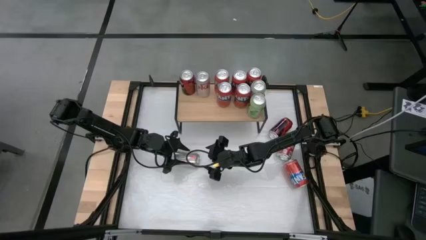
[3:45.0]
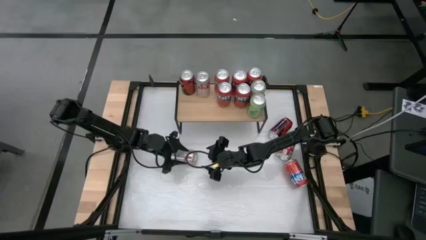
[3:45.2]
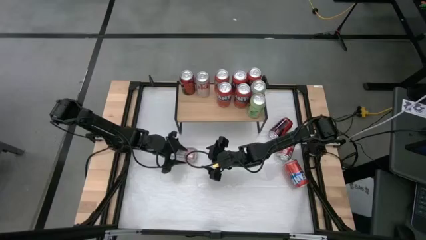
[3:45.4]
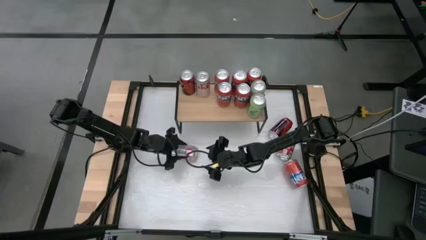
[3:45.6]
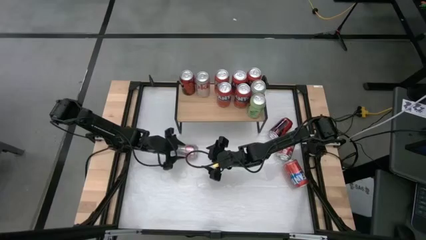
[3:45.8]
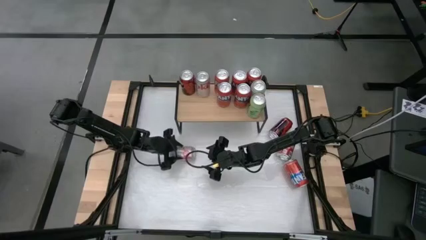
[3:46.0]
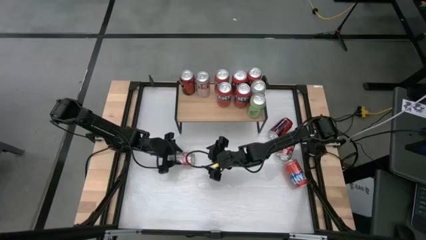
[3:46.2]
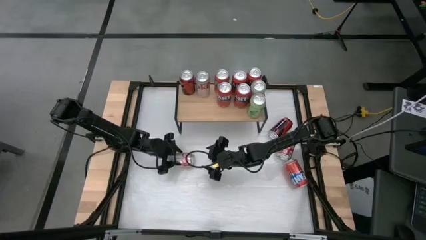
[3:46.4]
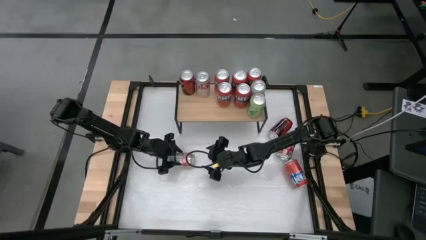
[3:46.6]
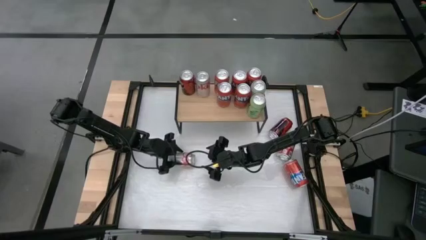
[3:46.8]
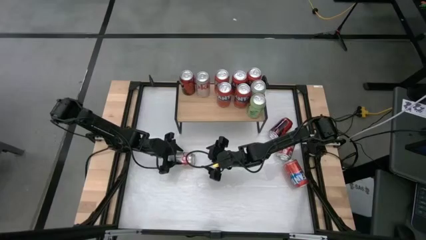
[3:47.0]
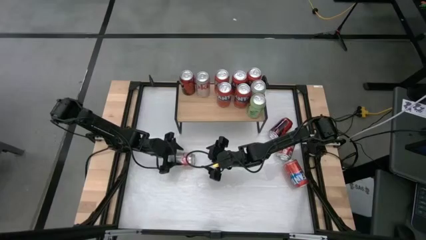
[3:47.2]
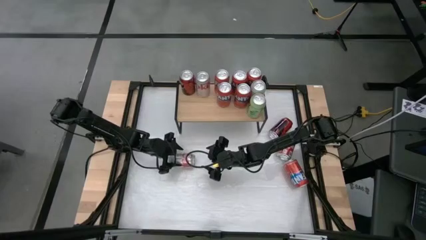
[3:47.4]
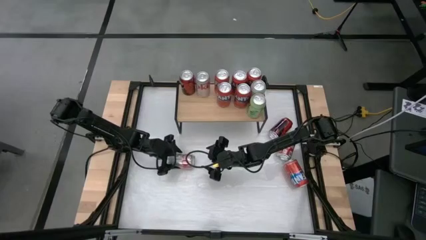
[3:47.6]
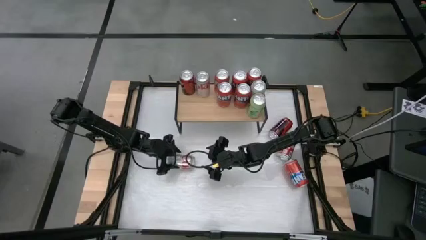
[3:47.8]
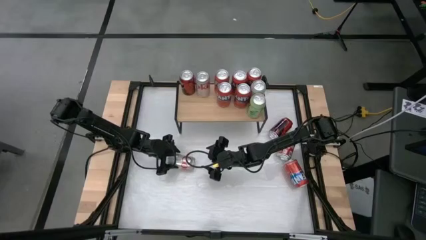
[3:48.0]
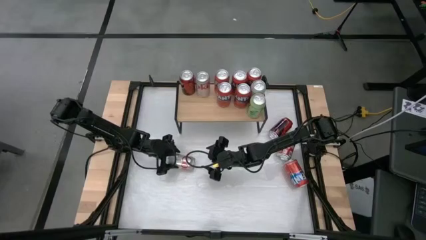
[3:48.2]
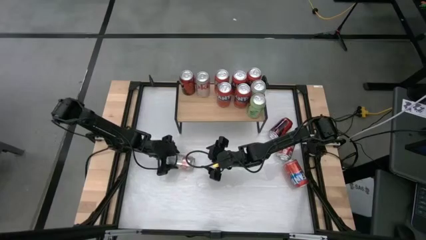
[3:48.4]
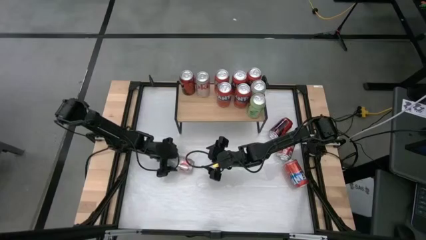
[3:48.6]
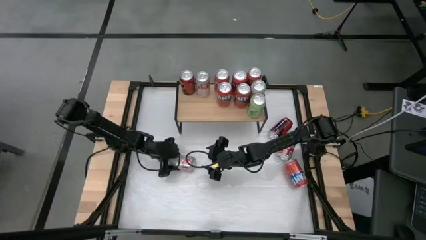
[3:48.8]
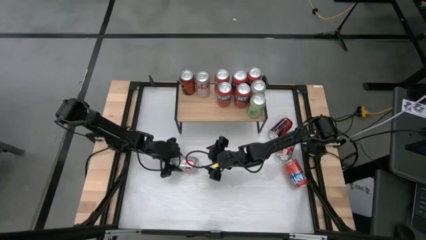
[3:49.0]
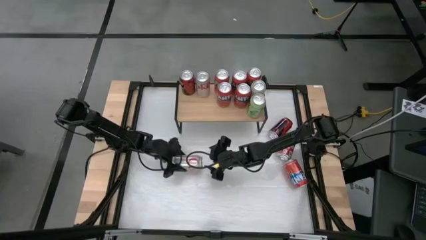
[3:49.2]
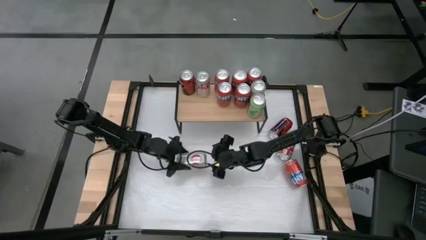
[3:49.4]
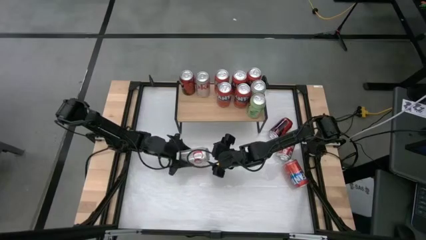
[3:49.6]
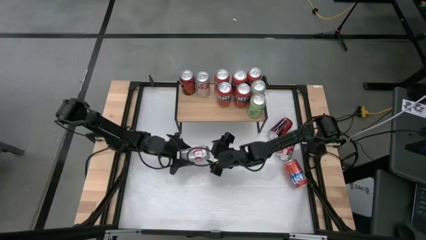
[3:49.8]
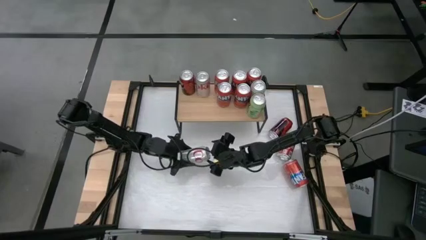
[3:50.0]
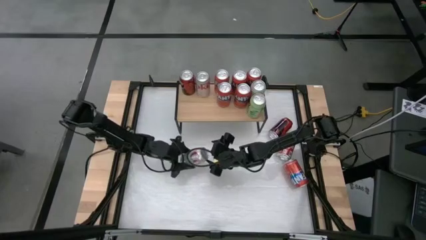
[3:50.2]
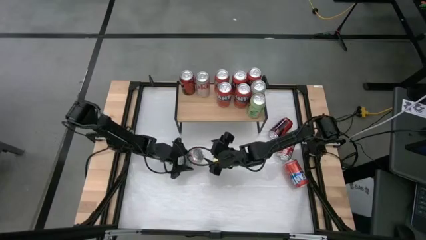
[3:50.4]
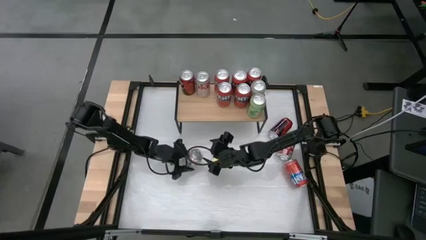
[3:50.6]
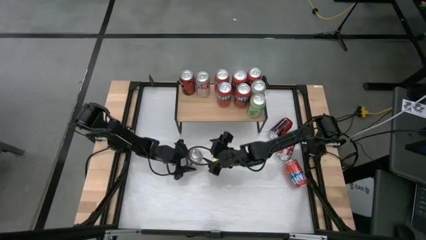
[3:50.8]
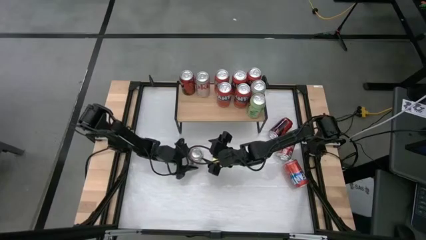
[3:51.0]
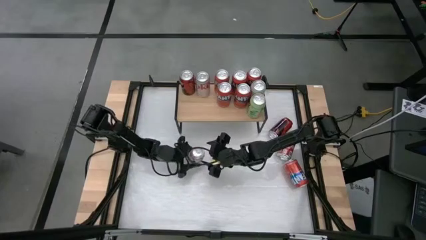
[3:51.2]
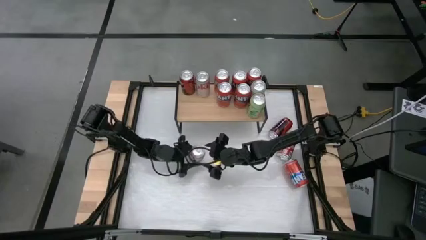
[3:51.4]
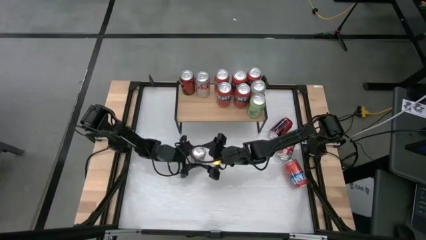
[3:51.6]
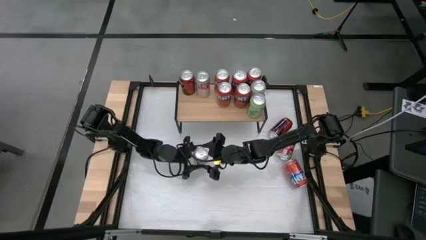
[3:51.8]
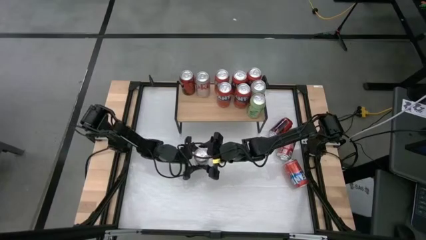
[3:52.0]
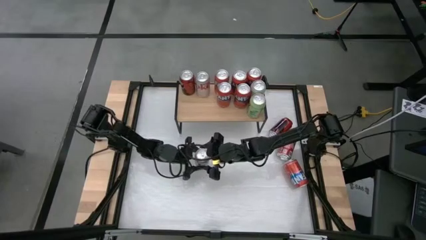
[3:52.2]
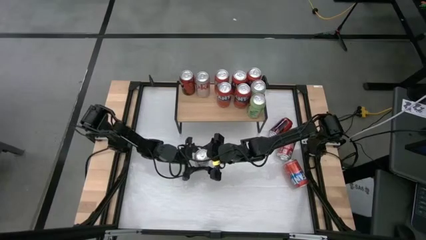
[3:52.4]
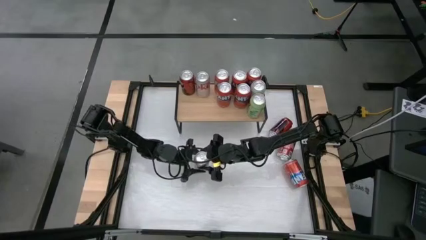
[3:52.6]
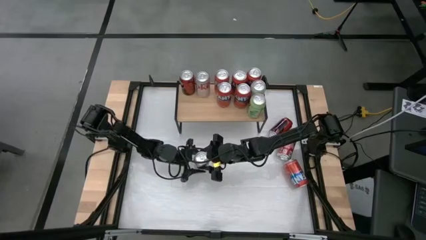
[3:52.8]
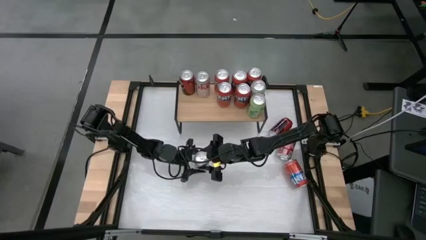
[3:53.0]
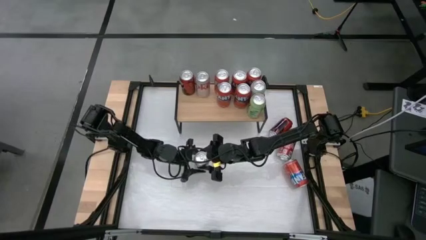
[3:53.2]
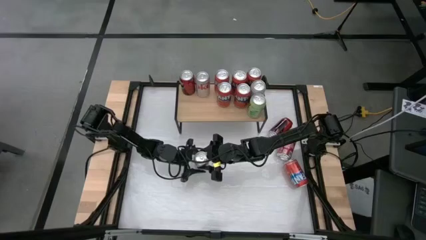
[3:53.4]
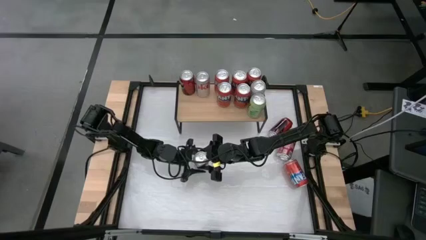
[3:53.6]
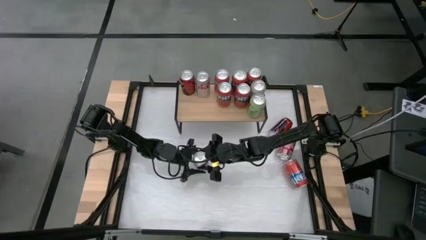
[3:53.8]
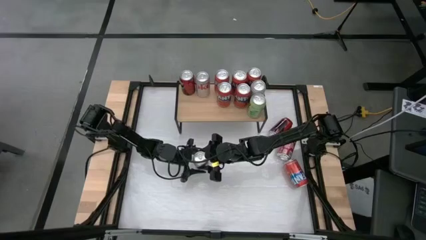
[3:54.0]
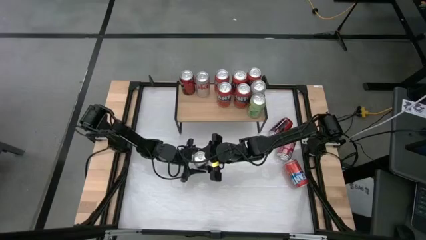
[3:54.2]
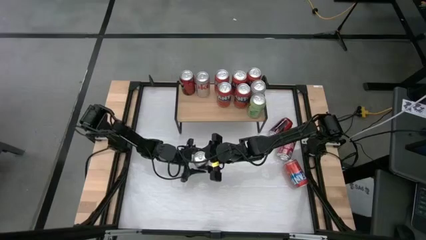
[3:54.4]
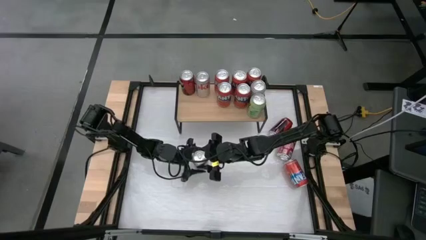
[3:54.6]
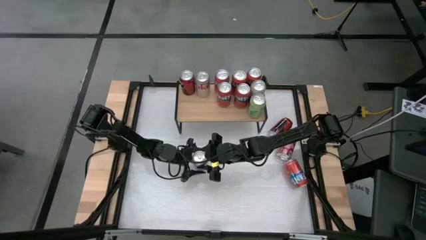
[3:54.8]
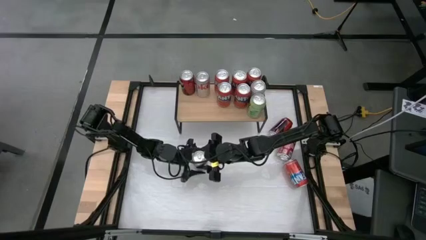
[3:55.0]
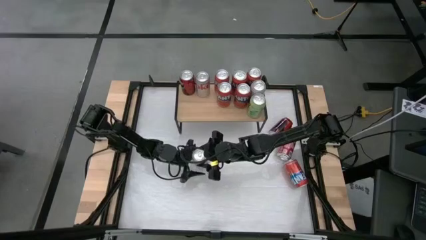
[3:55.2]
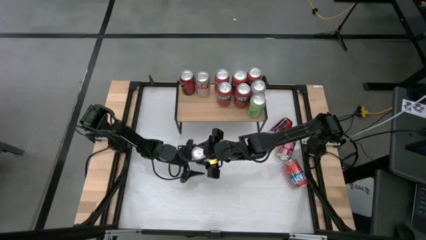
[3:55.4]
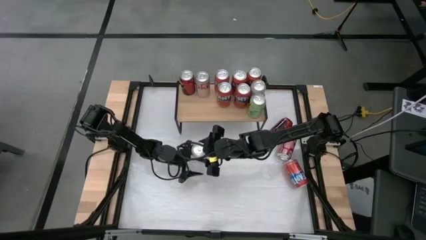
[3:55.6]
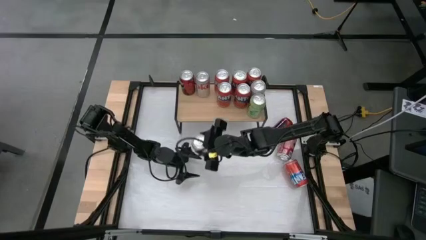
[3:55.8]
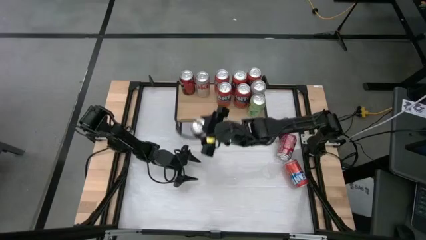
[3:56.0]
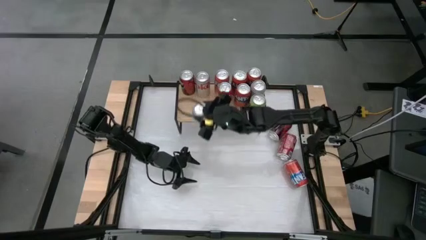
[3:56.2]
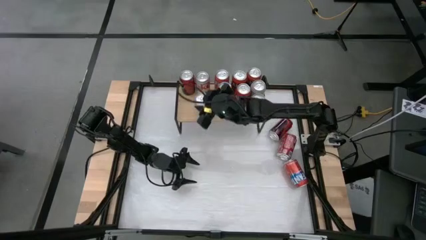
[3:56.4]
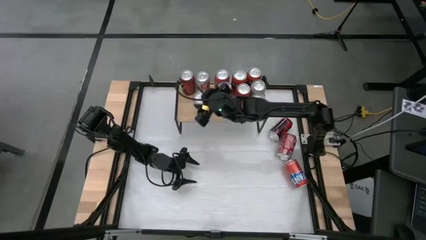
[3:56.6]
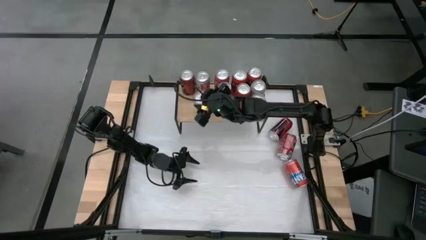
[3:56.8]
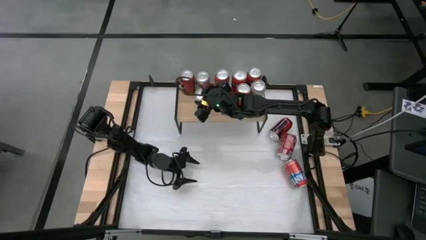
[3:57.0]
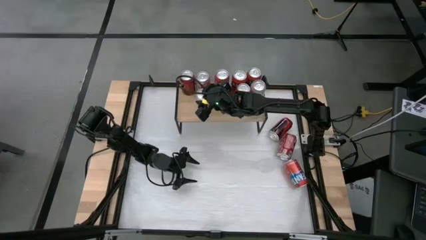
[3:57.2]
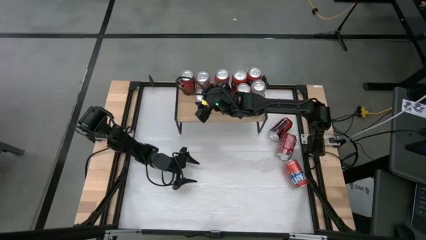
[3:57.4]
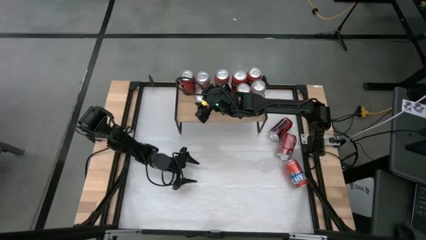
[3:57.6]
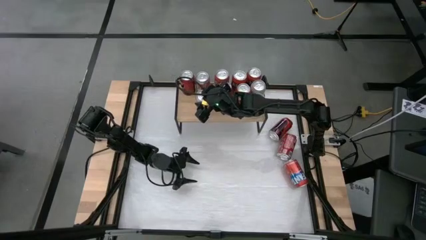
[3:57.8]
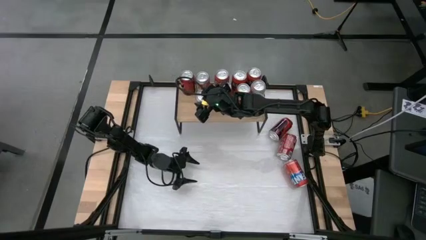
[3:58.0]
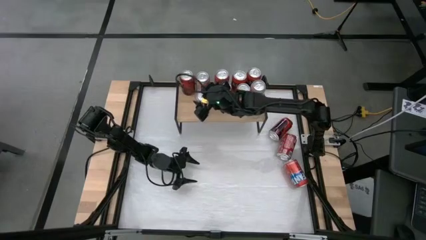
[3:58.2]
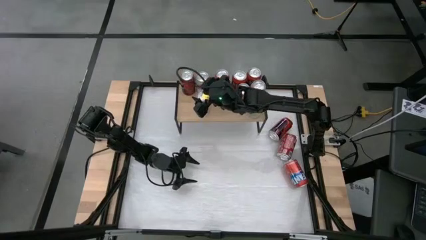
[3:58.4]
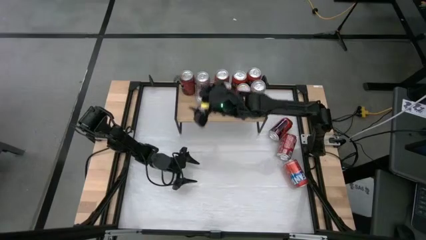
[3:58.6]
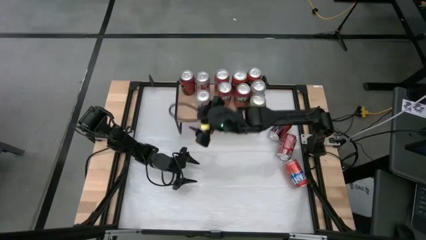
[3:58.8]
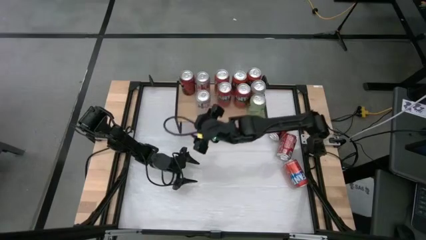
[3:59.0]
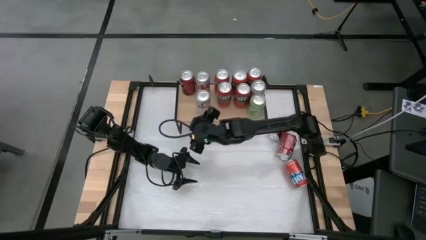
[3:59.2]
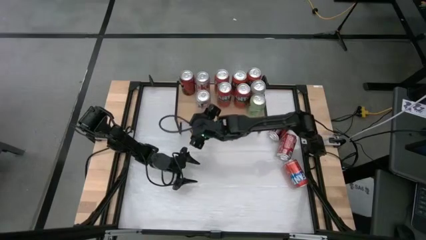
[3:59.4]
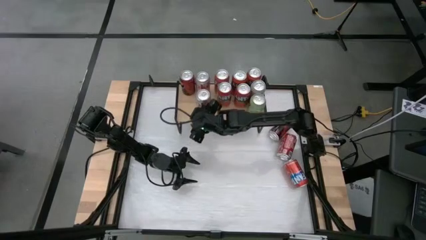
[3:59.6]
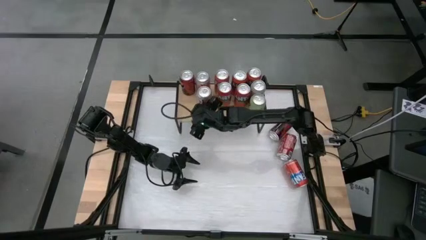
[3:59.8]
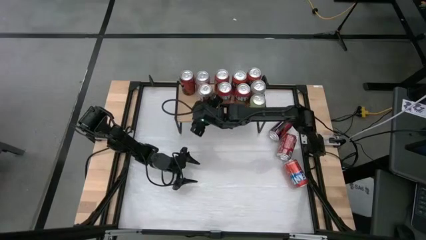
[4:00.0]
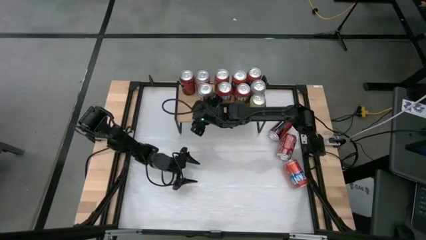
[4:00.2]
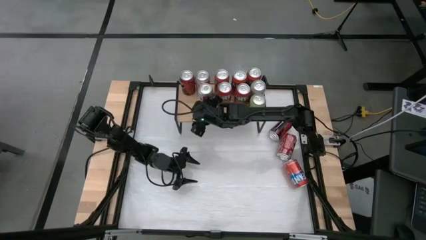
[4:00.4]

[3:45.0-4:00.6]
Task: Place canned beverage on shelf
Put the red white soda can on the shelf aligned with the other red white soda can
